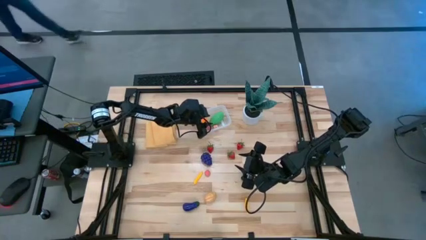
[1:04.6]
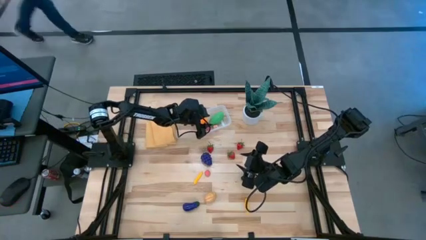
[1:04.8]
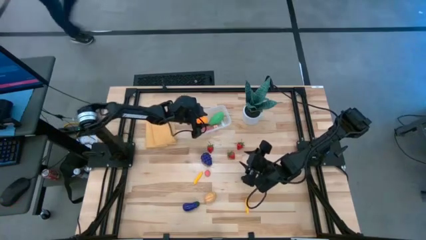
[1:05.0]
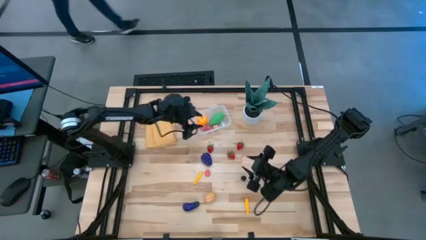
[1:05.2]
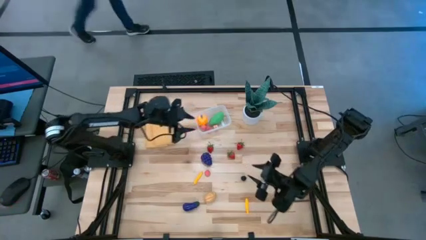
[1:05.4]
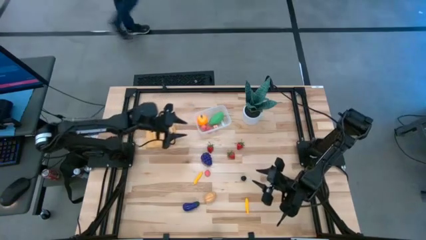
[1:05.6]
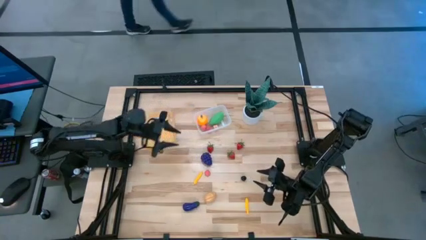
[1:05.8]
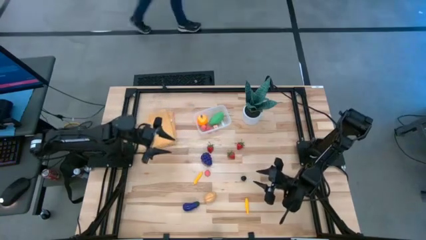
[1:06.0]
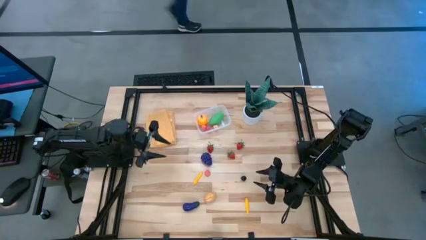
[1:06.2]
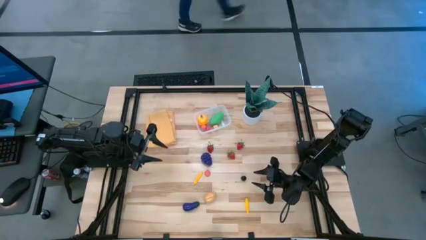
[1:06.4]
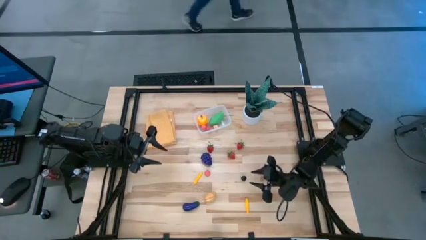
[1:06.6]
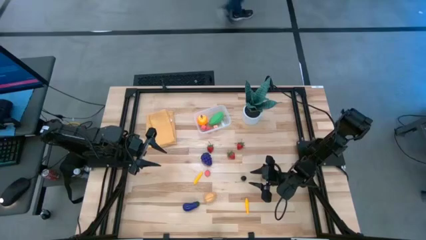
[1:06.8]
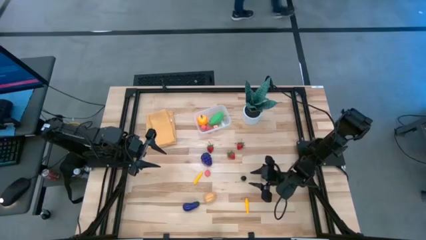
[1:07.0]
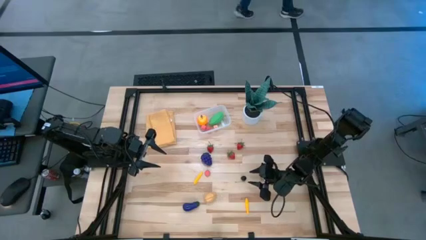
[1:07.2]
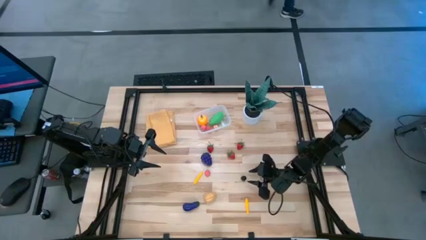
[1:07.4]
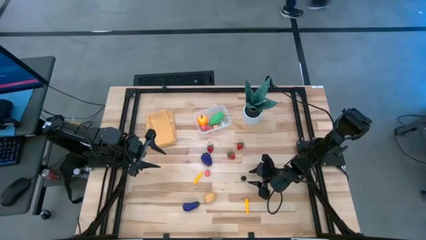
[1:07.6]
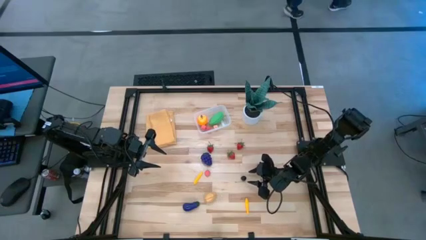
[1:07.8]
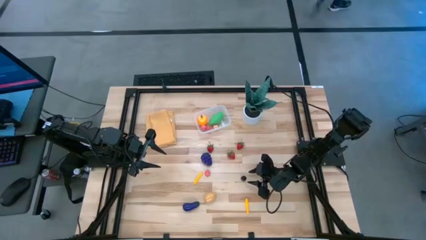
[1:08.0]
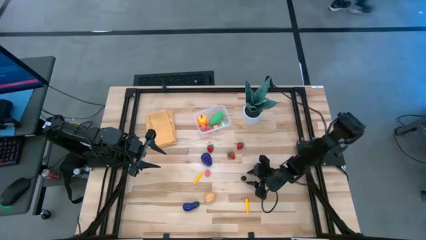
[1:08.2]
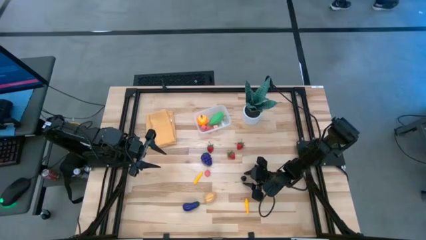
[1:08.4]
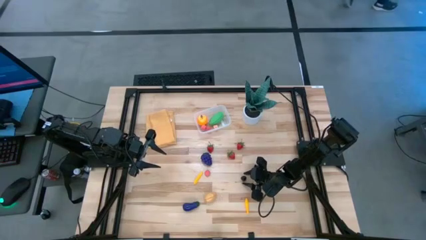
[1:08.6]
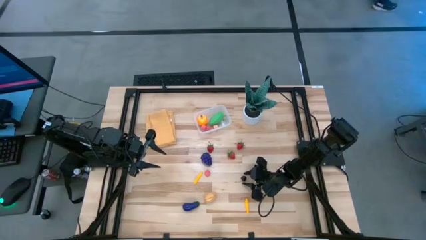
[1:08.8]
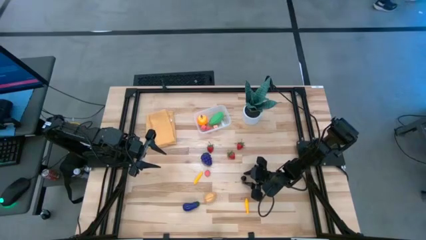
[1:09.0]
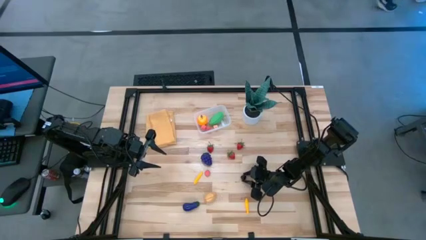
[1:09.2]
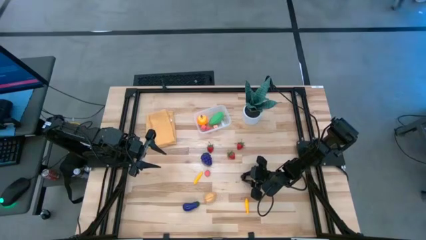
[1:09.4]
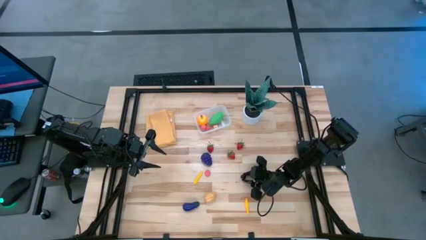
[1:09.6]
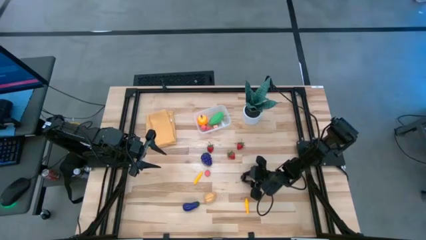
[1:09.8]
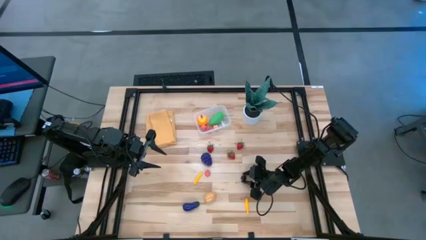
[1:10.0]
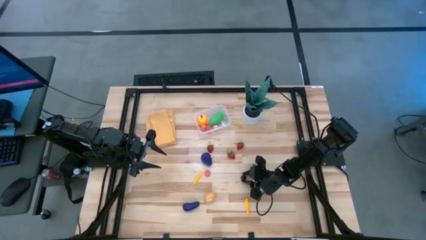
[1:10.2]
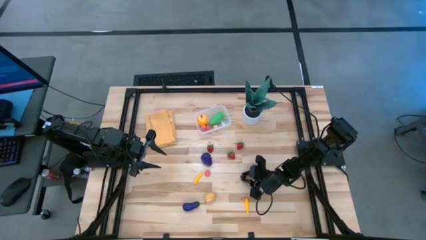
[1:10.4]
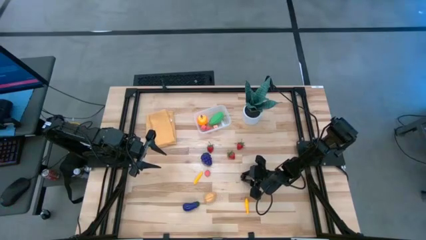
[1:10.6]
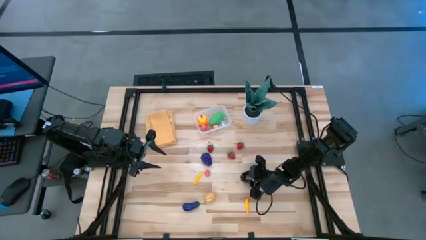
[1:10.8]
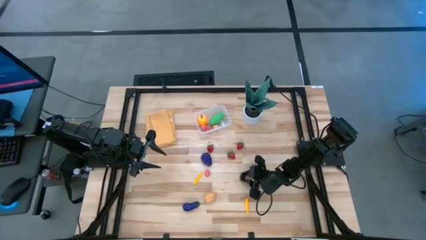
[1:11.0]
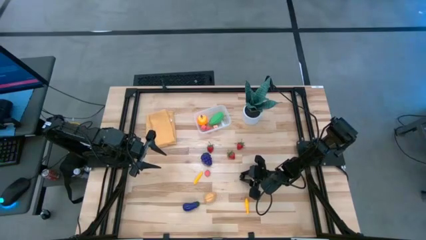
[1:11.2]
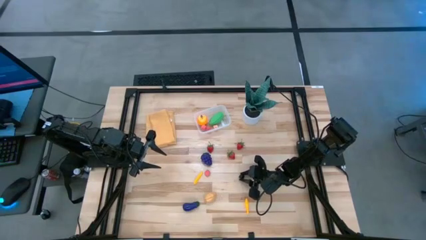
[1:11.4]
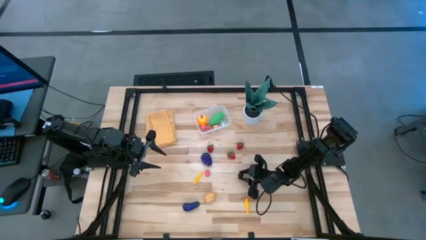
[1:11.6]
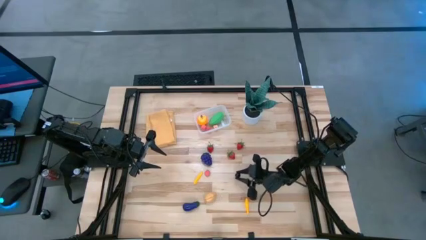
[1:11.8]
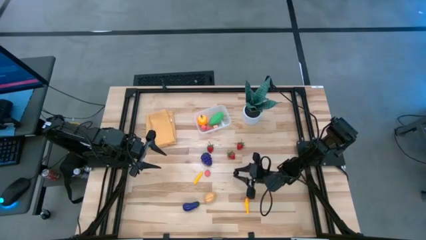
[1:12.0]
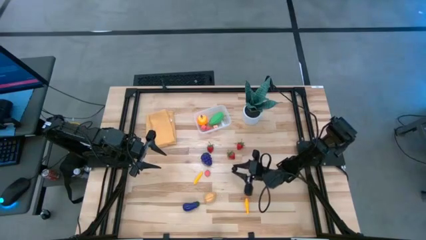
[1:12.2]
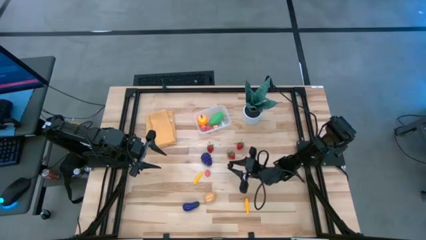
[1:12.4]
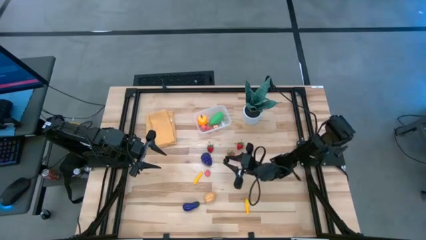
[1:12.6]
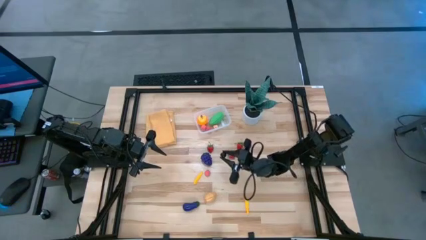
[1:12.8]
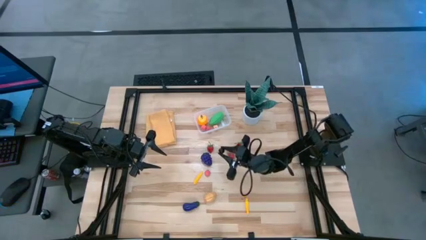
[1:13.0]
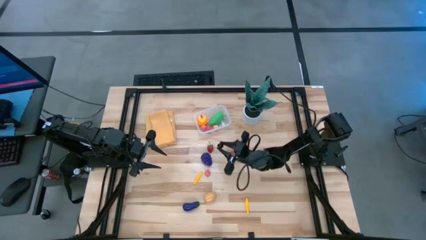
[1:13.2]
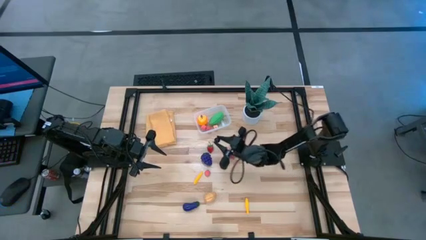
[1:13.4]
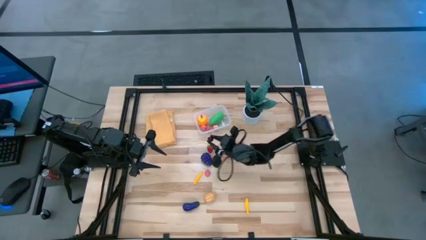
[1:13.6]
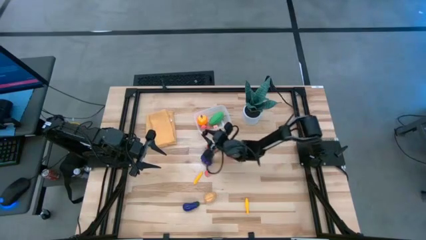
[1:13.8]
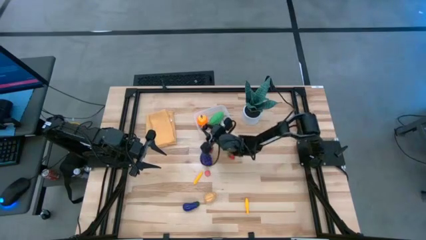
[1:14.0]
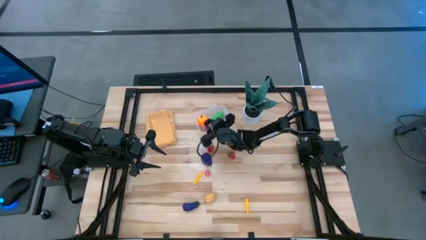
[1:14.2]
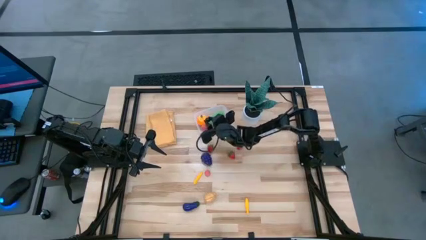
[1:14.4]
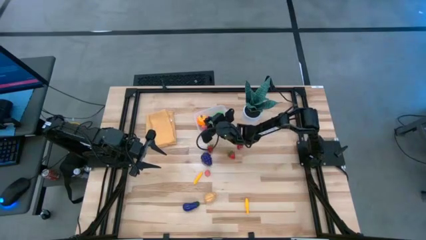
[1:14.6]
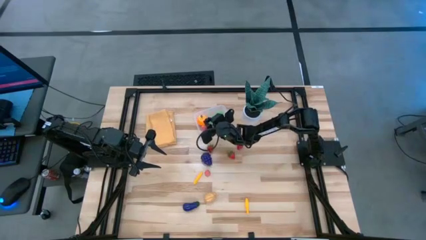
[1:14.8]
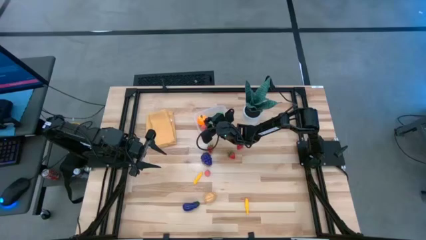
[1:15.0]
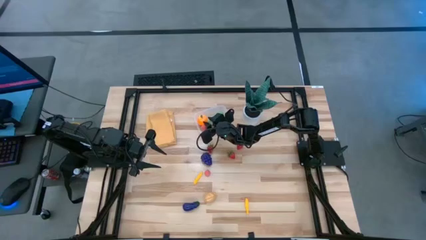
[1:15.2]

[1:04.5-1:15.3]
Task: Pick and placing Produce into tupperware
Put the black cherry into the transparent bin

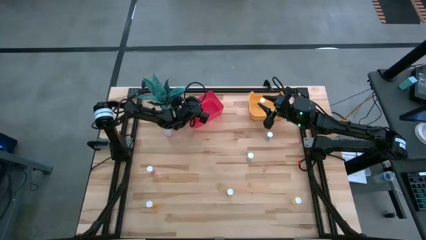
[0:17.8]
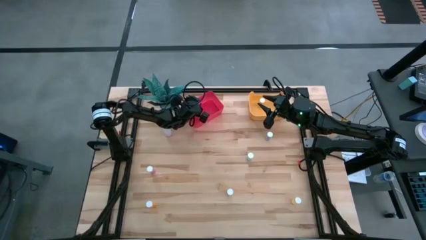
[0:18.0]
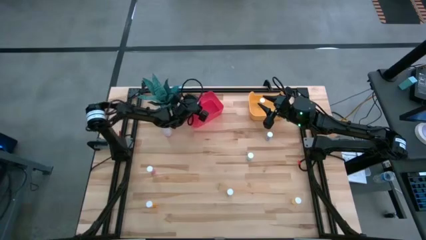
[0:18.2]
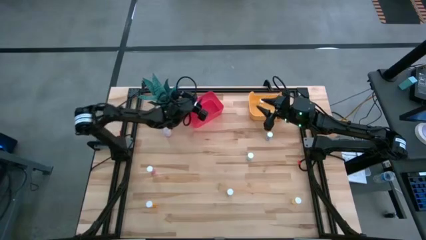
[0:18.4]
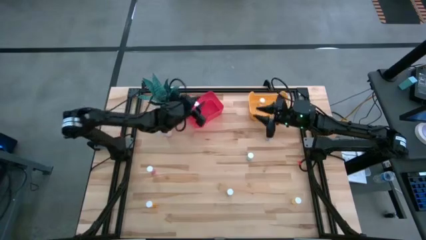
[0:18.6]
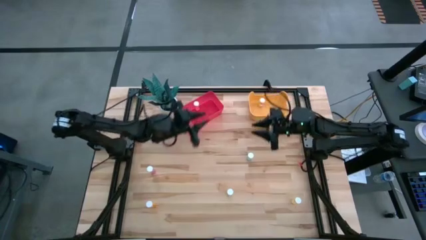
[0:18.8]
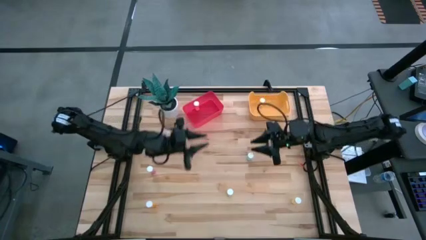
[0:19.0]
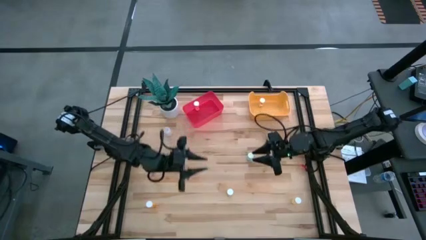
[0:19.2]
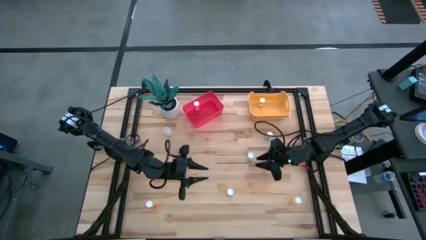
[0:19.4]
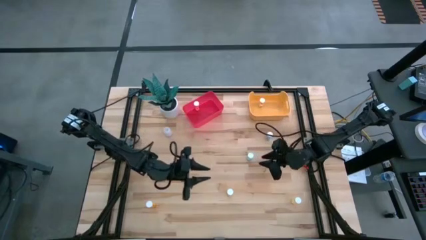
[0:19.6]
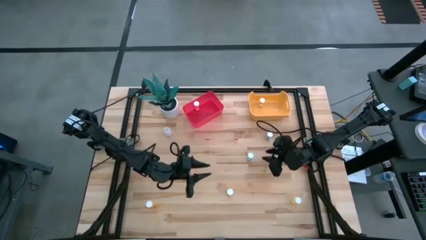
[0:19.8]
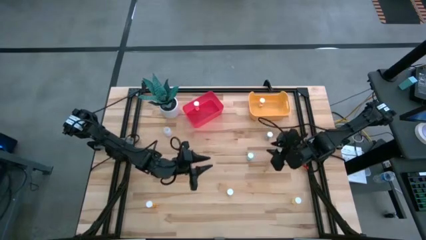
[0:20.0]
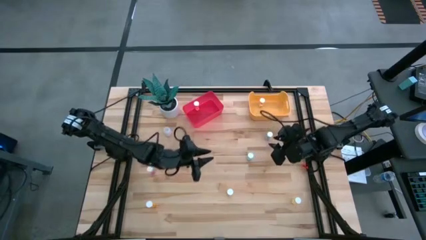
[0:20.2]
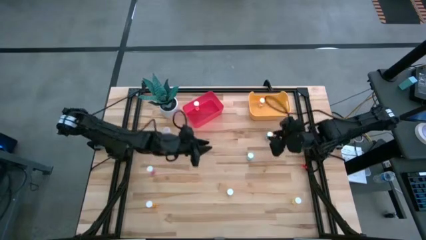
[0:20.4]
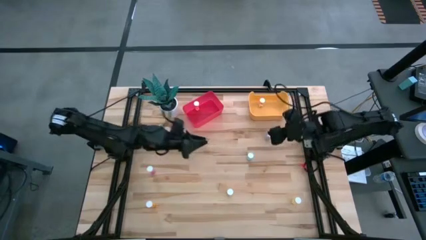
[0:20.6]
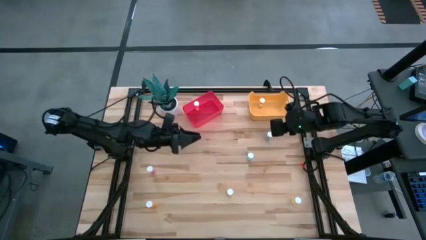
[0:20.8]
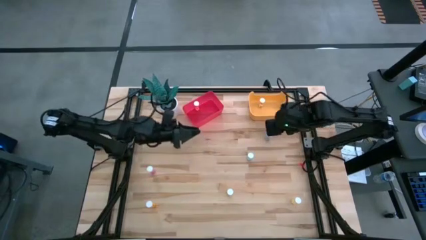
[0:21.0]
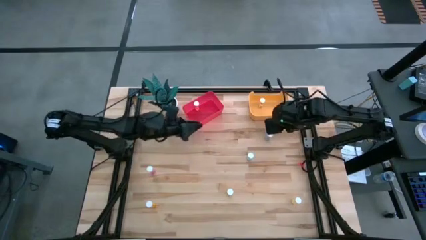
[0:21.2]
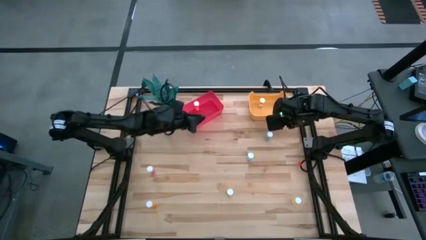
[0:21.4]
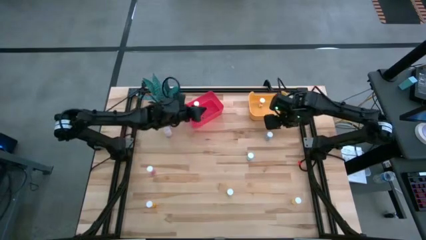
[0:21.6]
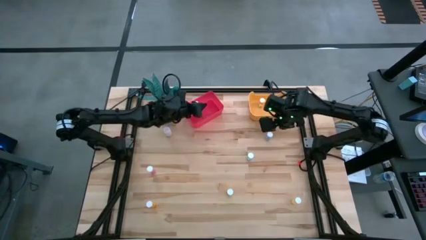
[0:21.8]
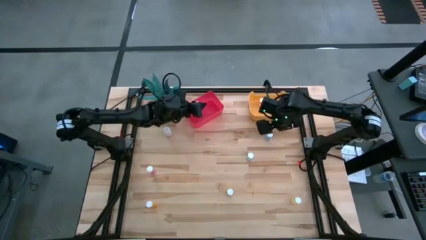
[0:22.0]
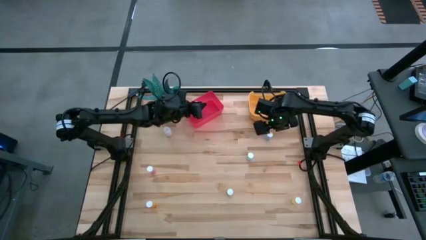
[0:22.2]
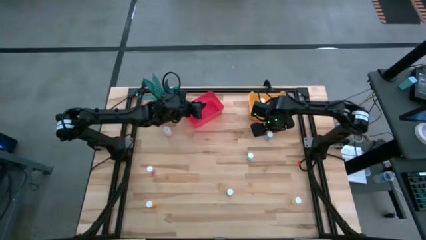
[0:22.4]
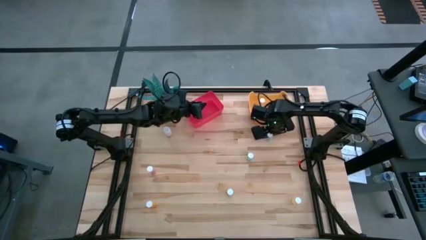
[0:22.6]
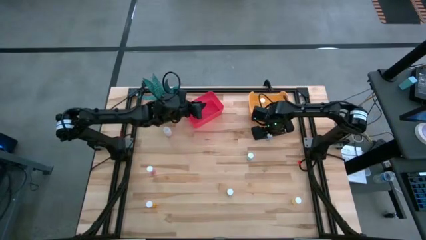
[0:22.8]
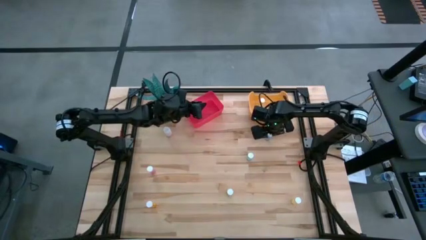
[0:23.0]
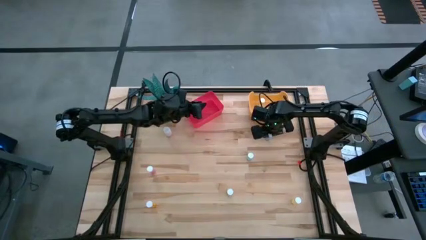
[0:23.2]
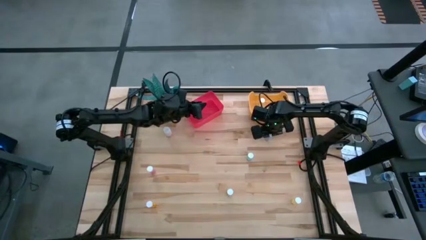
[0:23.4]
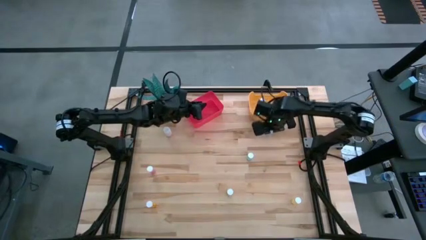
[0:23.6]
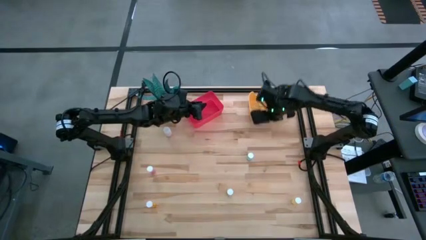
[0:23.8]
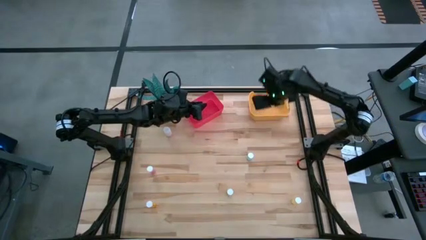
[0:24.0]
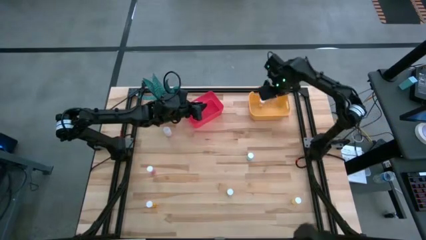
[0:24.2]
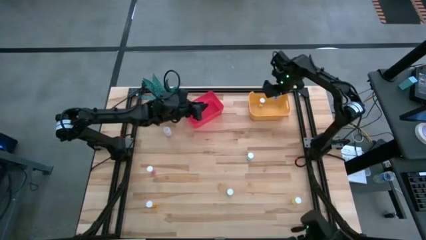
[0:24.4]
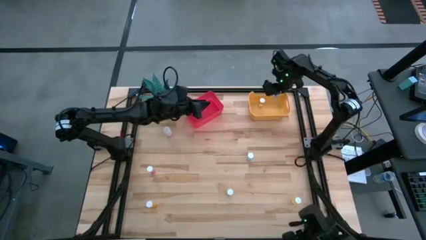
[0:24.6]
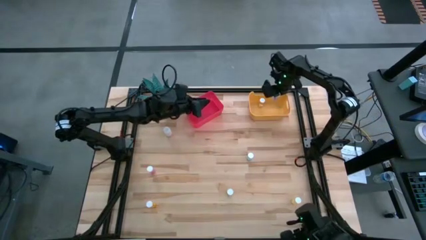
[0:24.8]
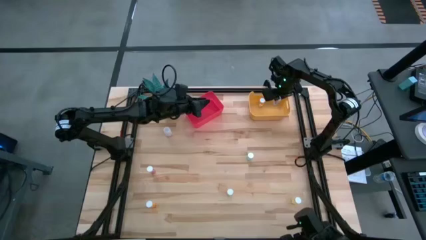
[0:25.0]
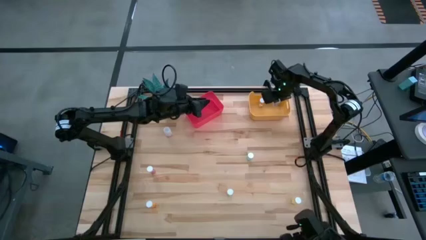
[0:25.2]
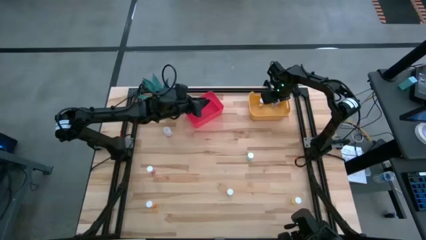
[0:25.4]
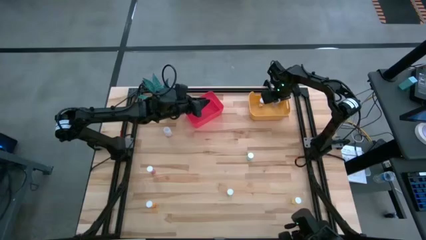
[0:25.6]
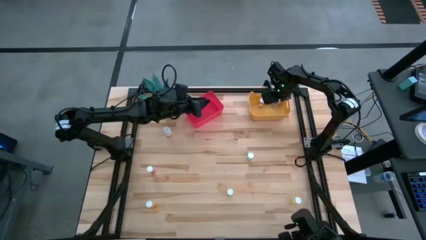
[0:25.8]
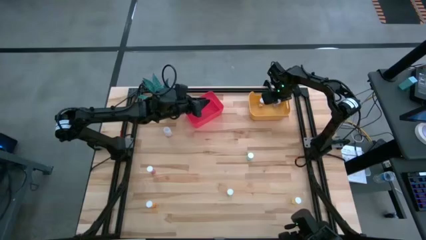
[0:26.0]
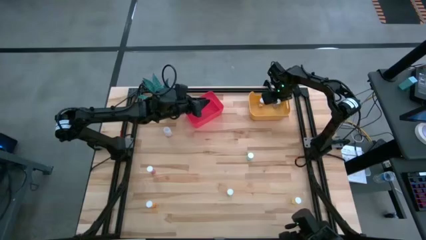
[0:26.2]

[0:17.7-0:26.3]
Task: Pick and place medicine bottles into bin by pill shape (circle, oval)
Put the blue capsule bottle into the yellow bin
